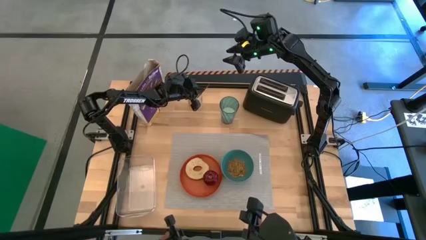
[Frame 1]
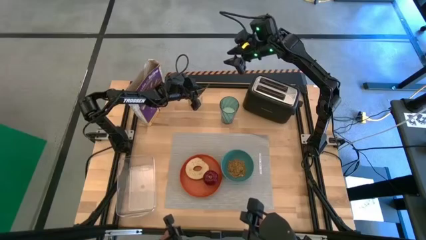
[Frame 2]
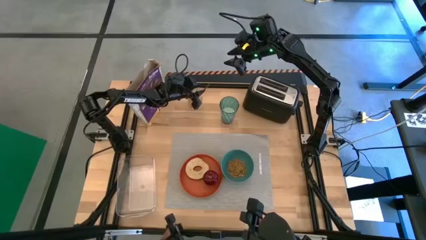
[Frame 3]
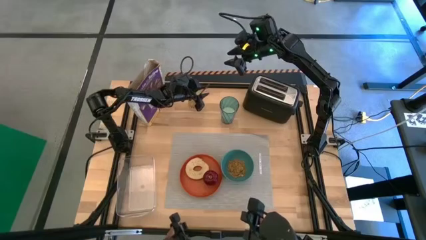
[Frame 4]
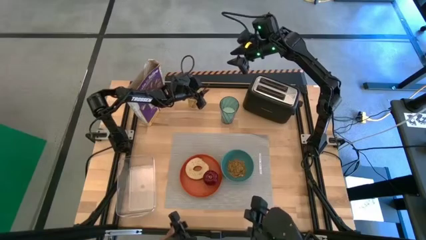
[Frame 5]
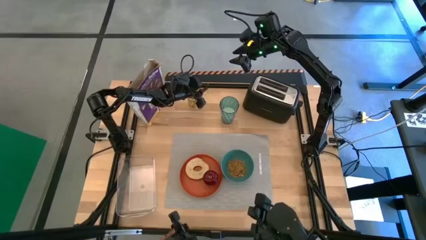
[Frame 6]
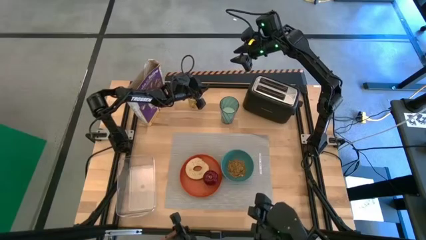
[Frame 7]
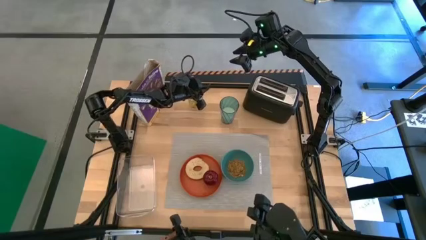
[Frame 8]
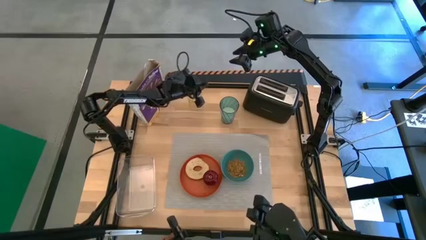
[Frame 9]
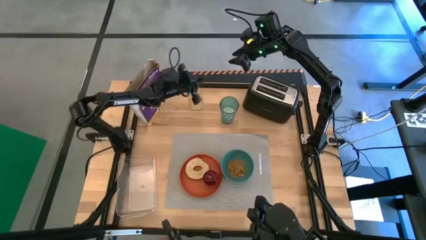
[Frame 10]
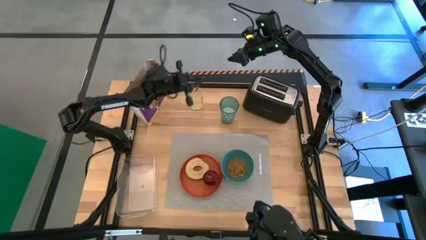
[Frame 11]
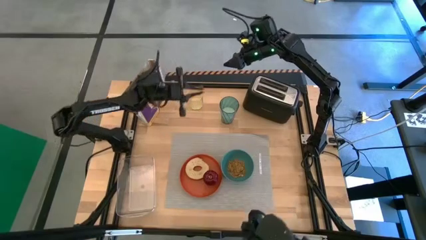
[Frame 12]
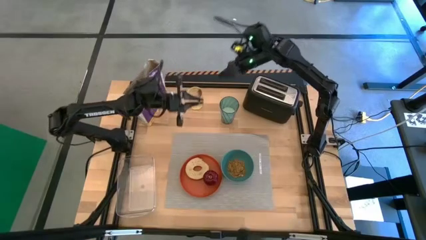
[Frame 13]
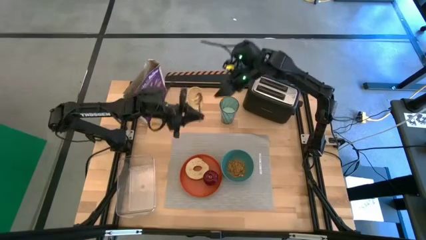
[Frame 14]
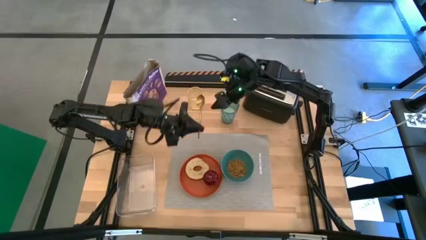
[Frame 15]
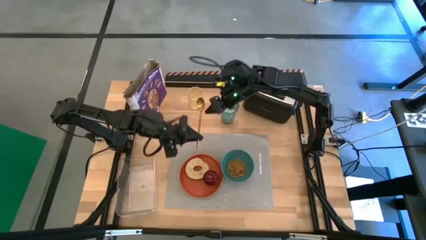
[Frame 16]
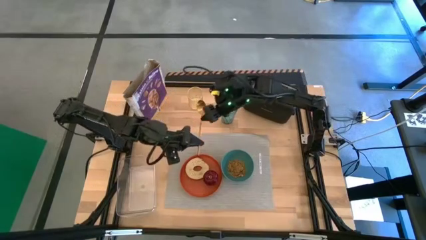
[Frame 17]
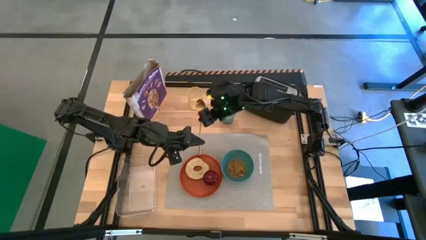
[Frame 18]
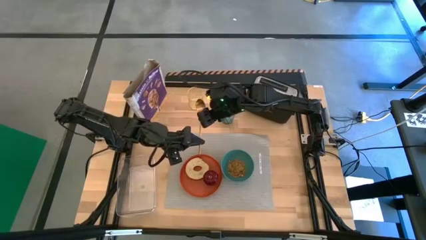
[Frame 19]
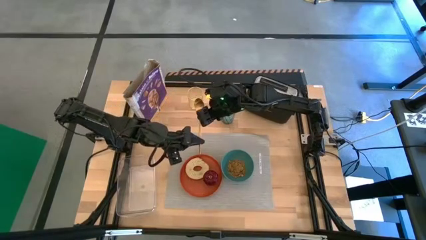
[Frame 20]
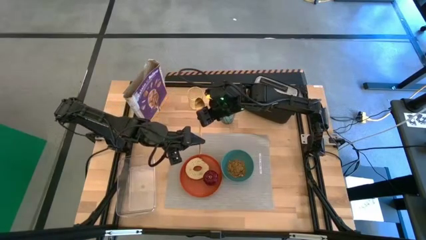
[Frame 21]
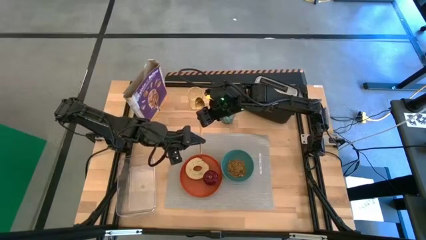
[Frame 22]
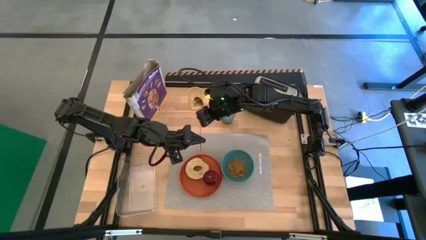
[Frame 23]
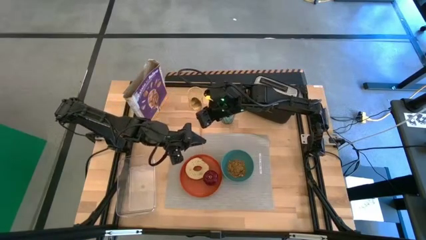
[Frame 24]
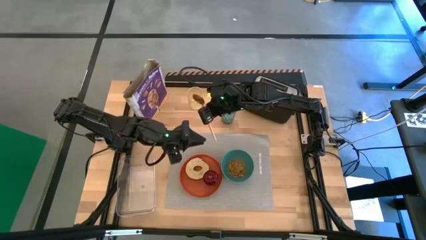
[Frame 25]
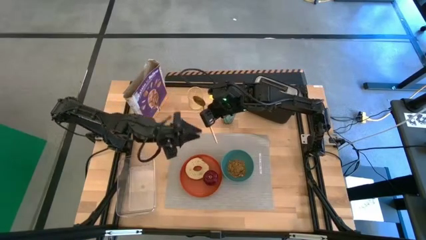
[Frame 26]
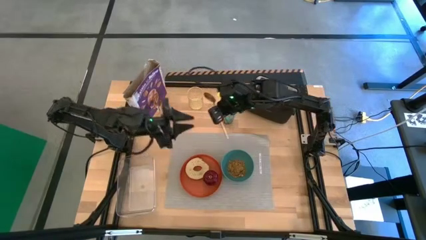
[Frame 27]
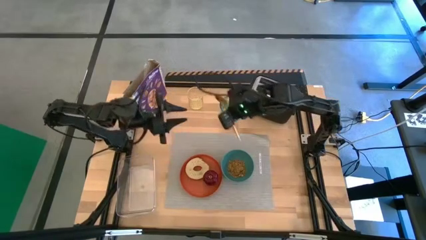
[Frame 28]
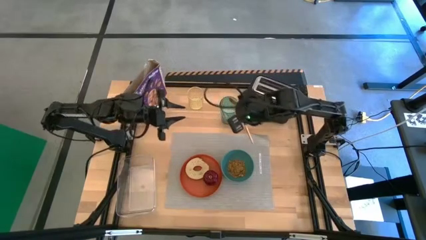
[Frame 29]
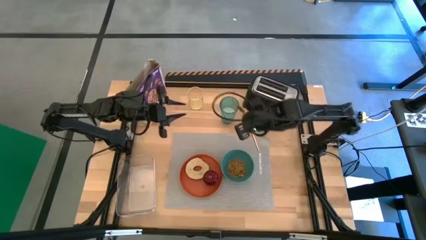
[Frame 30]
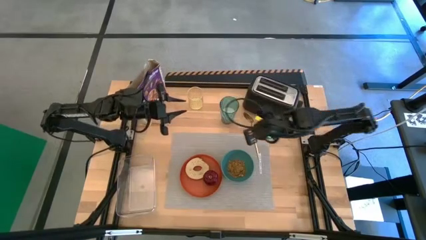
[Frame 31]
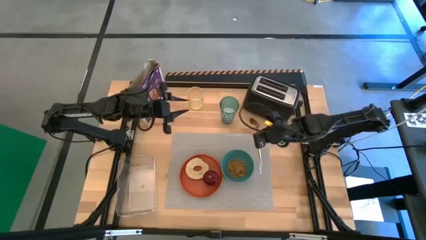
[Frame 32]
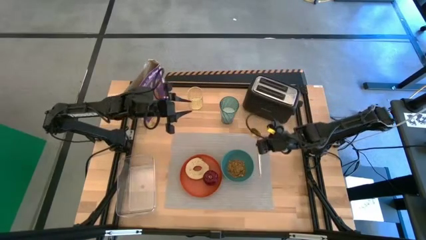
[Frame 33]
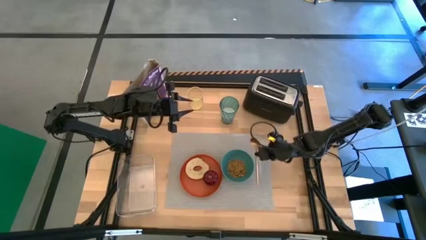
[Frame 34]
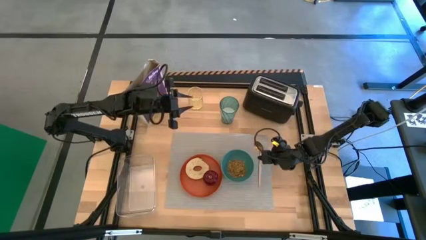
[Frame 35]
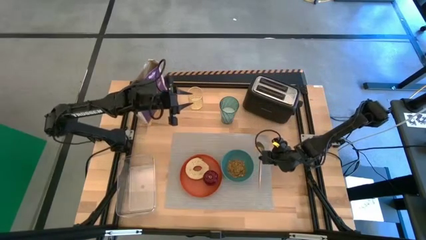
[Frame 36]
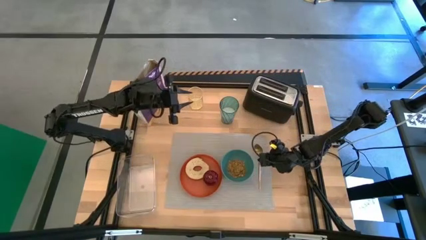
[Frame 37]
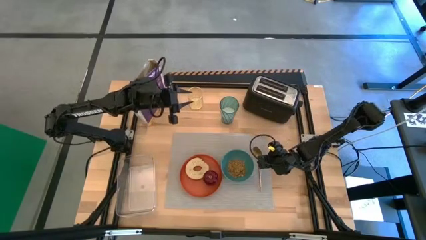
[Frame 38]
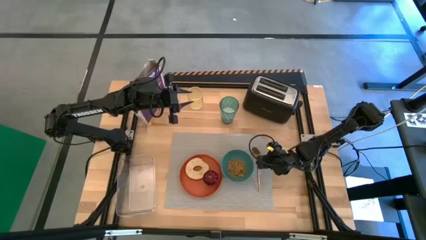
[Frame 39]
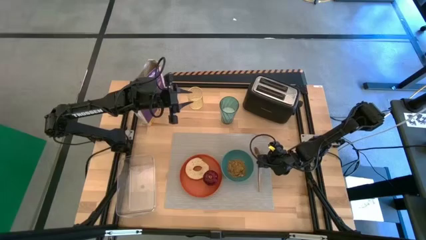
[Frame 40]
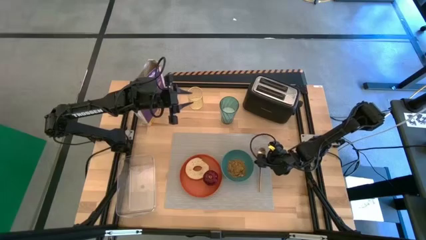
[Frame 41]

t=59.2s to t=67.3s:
Task: Arrange a breakfast setting
Put the spoon beside the blue bowl on the placemat

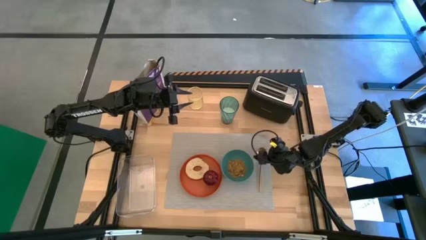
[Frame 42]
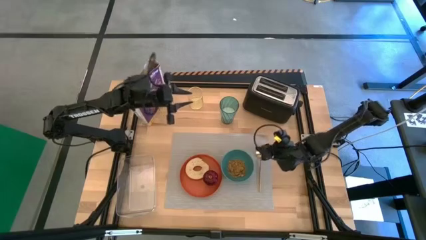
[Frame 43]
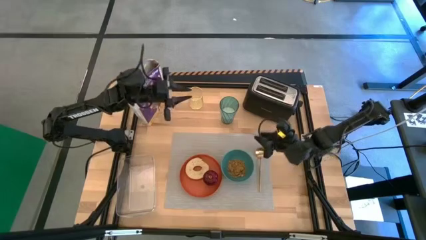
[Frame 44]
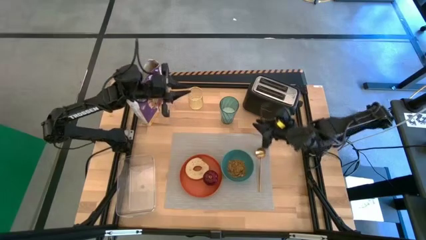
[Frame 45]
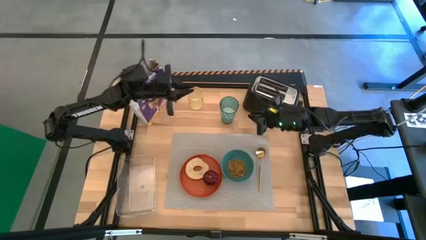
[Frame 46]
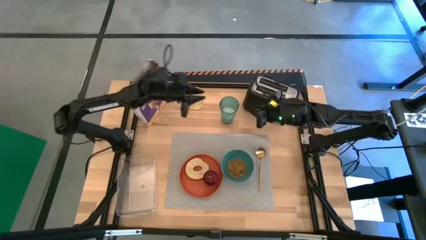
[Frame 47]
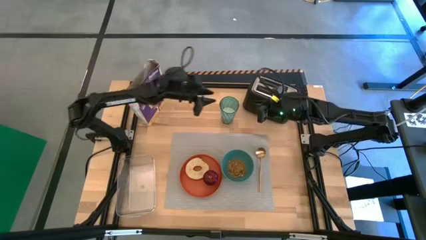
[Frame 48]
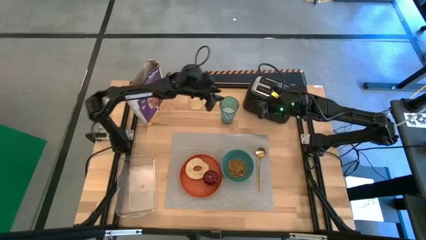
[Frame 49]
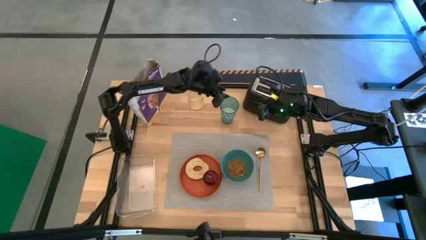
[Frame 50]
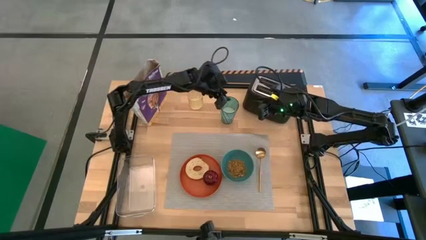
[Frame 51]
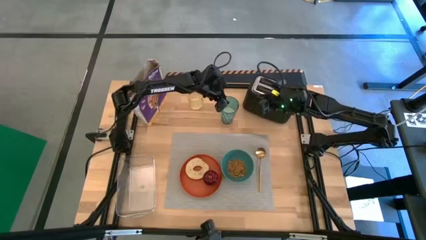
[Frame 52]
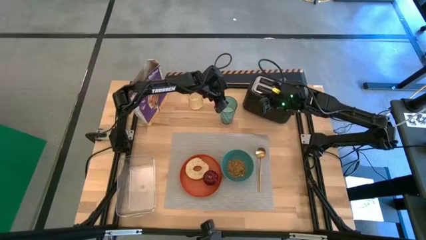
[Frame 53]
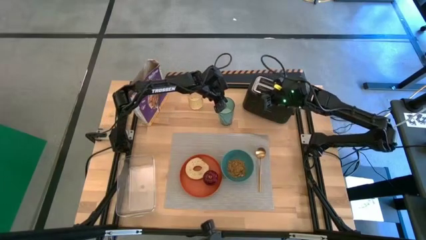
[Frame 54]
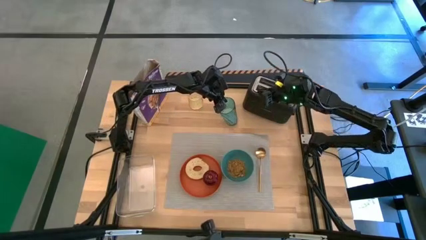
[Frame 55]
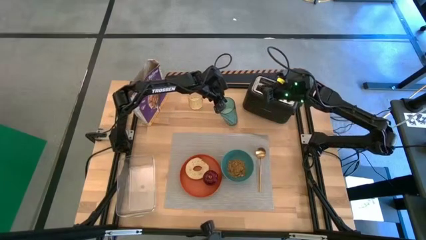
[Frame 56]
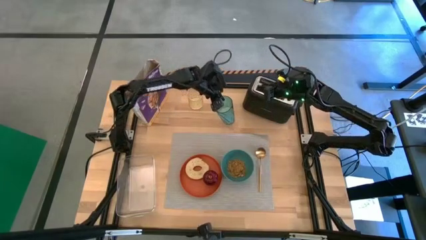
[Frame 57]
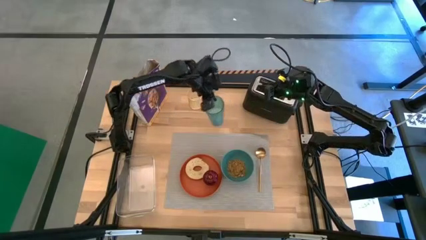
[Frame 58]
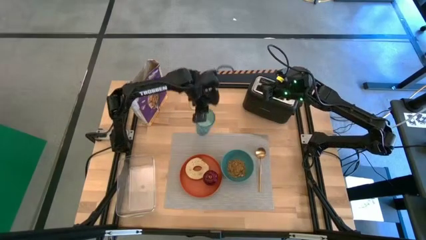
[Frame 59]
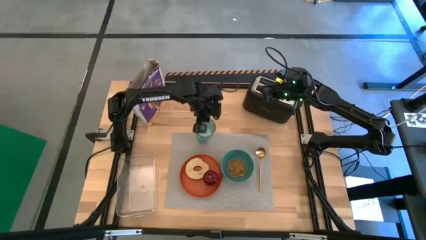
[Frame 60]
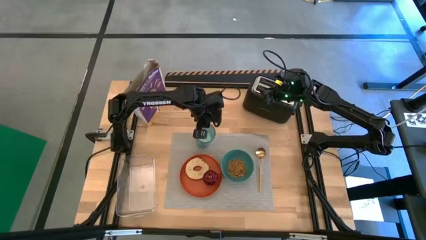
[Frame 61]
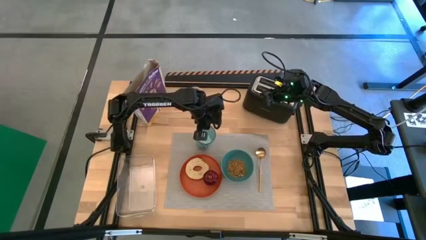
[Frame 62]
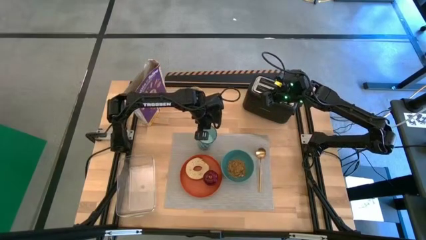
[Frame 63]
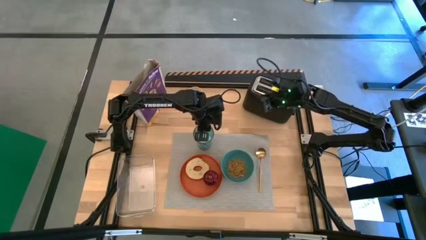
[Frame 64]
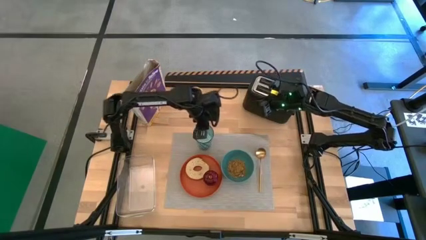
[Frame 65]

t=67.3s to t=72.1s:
Put the cup of milk above the orange plate on the placemat
